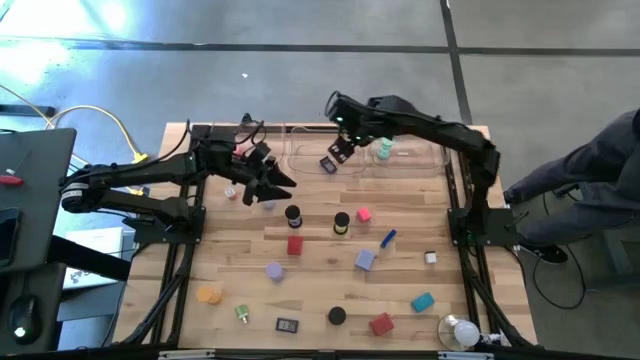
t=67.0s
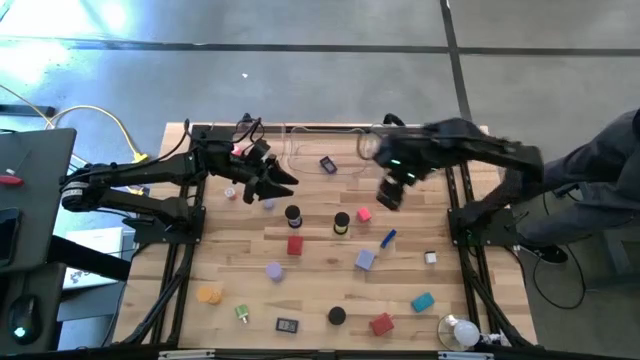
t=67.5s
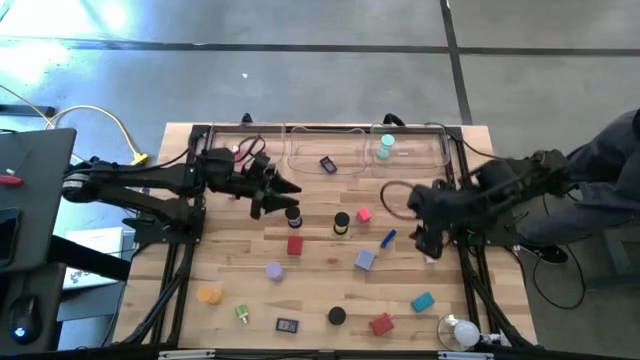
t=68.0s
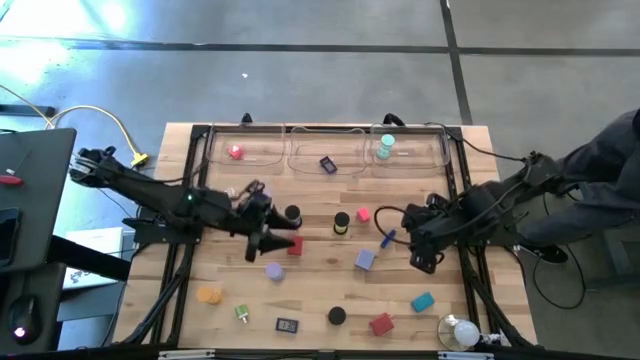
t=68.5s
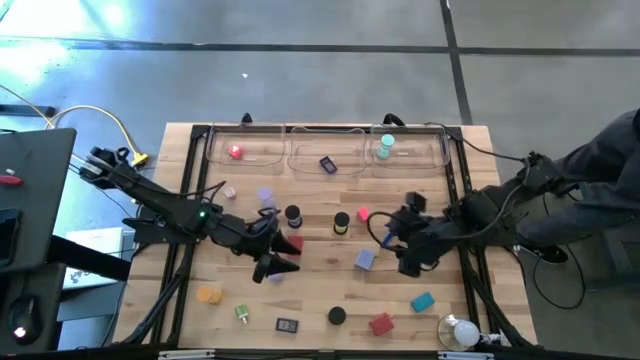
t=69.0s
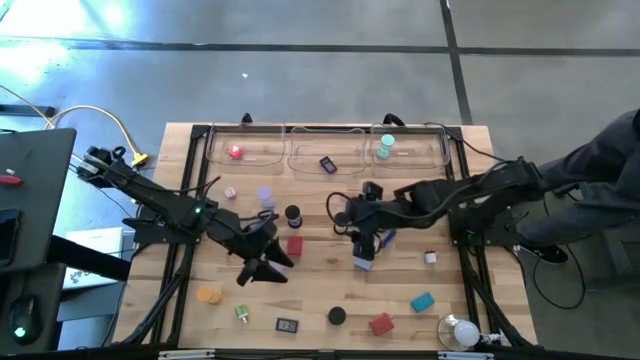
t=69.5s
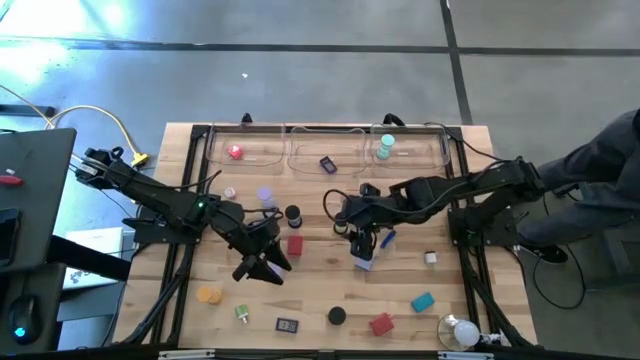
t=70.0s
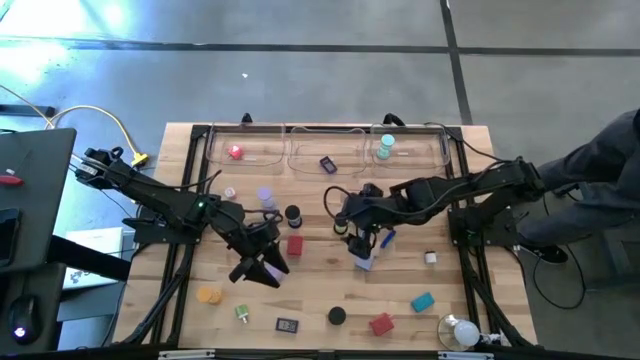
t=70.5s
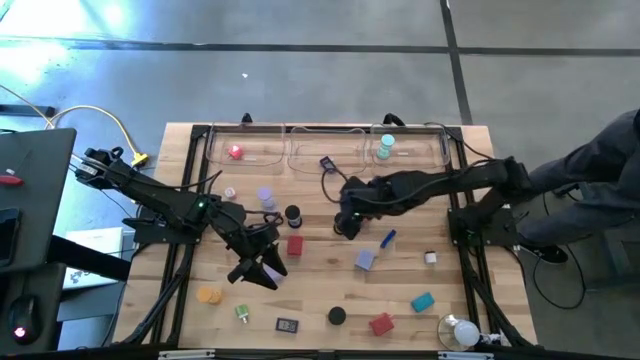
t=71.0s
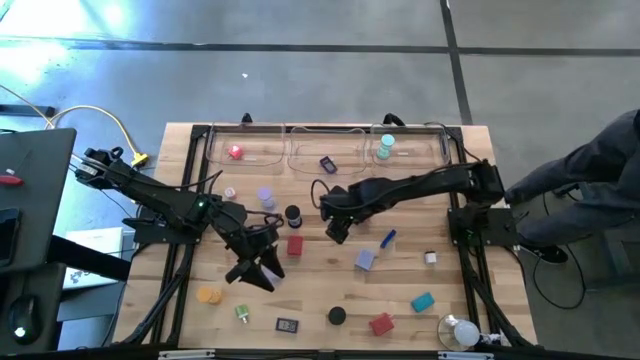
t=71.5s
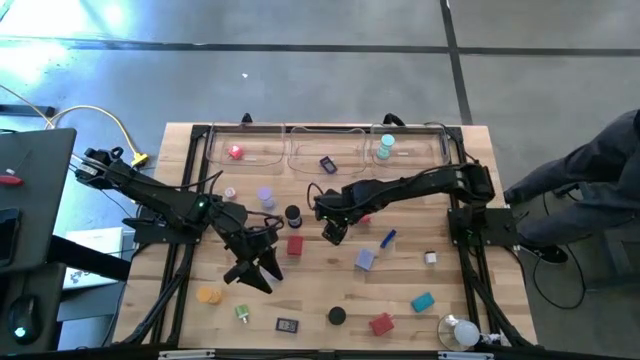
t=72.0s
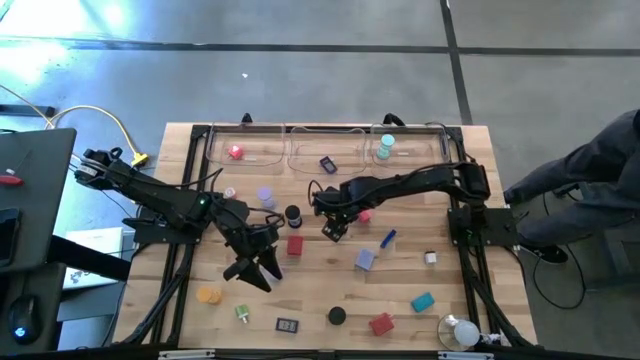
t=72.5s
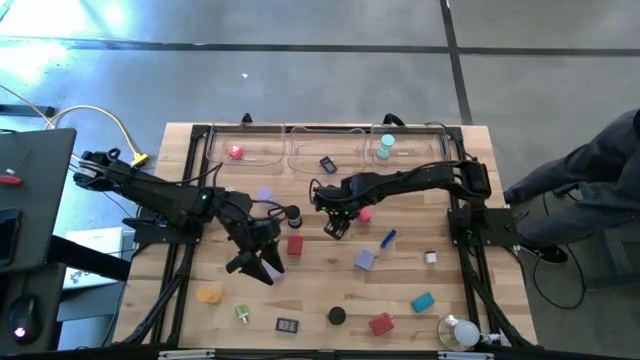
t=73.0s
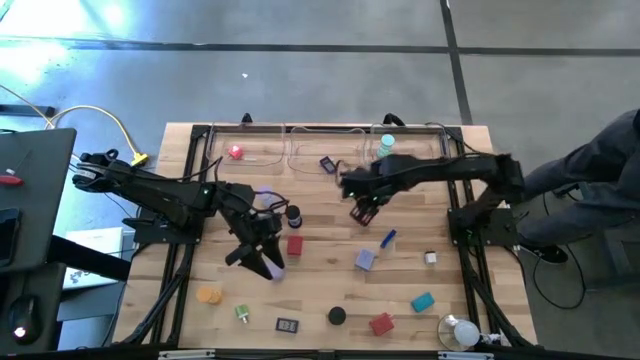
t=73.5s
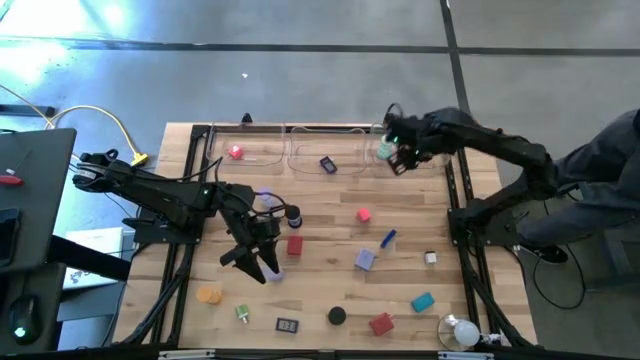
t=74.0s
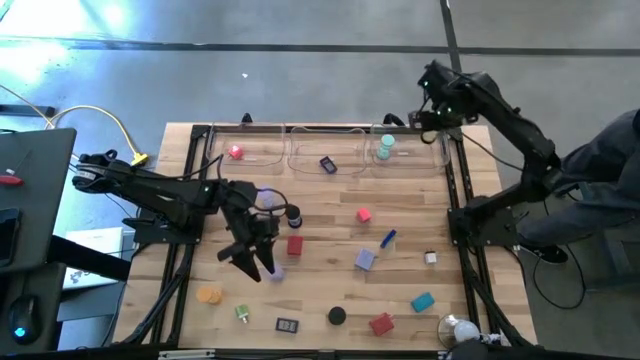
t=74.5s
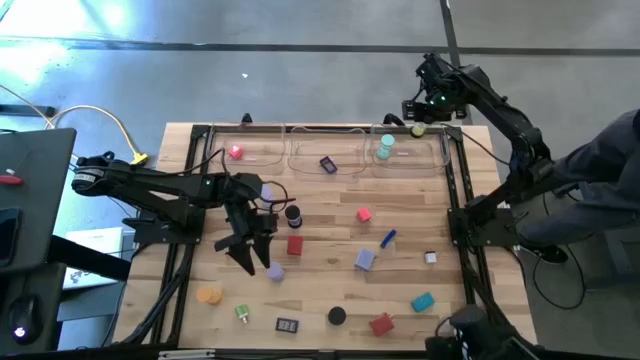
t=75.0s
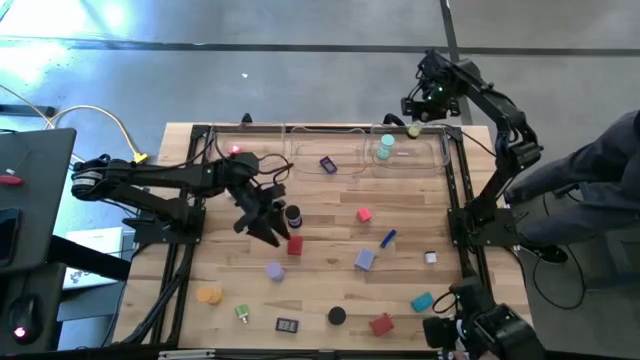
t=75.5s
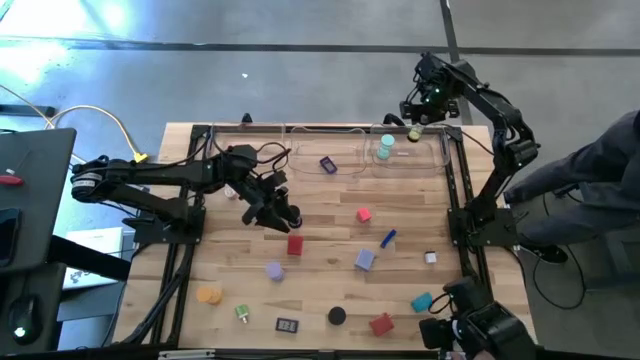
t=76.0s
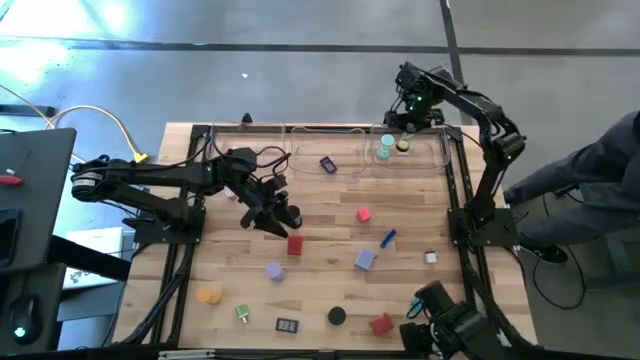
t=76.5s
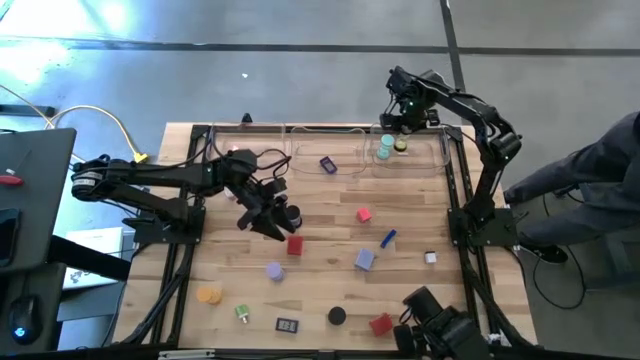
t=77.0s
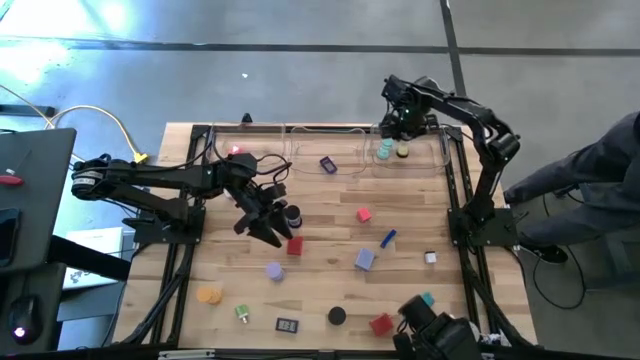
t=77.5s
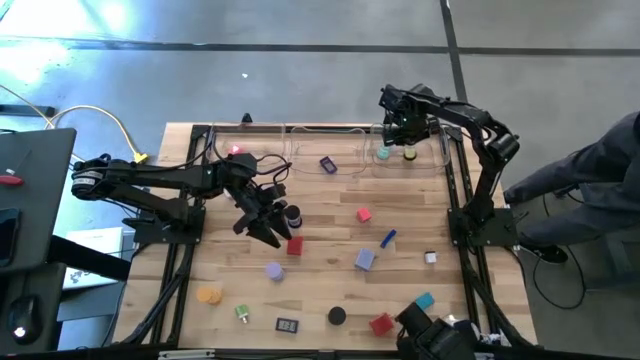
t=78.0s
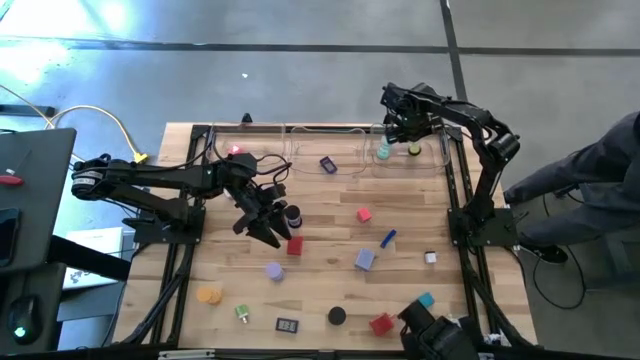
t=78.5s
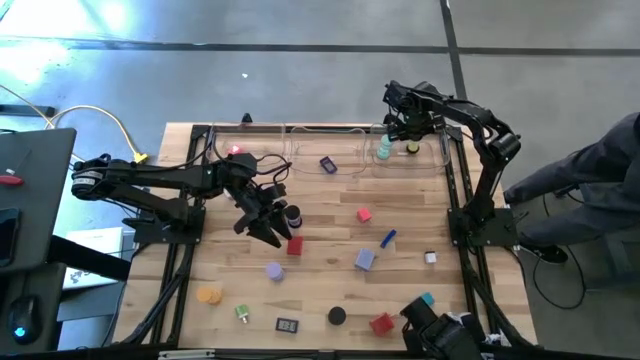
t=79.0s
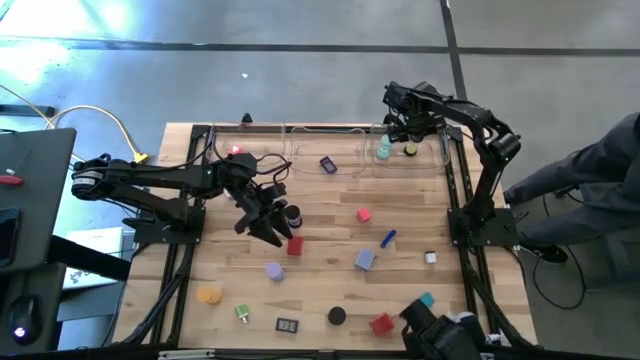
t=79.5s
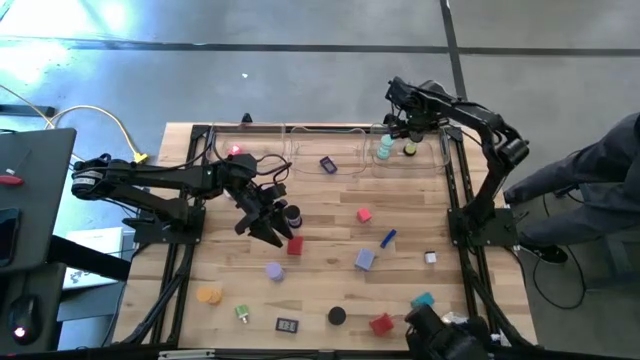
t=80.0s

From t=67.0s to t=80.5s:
Task: Pick & Place Office items
Put the top right black hourglass into the right transparent bin

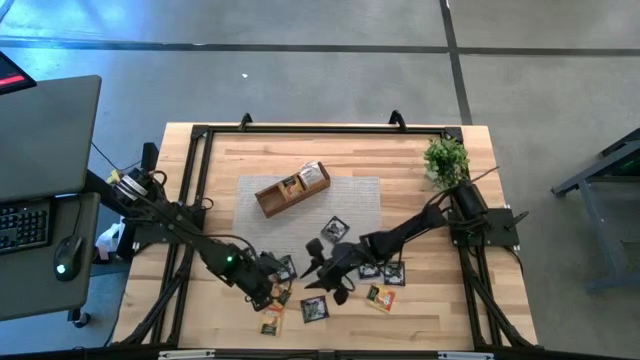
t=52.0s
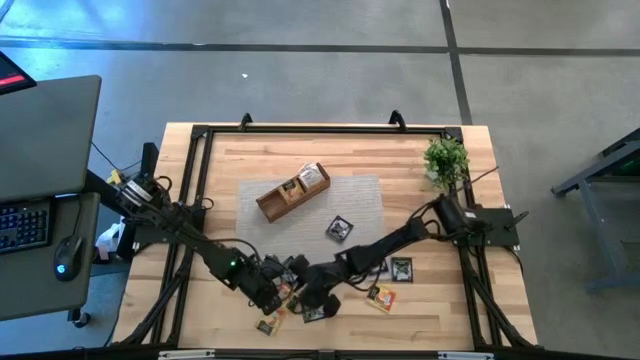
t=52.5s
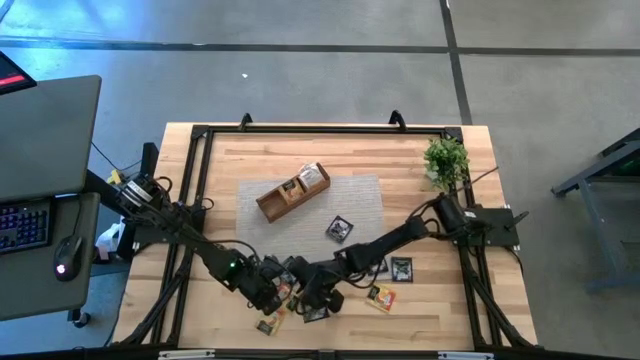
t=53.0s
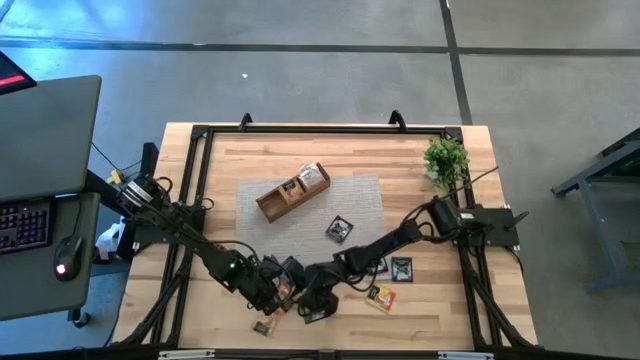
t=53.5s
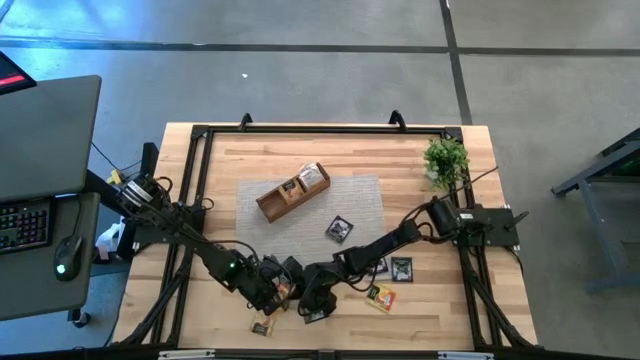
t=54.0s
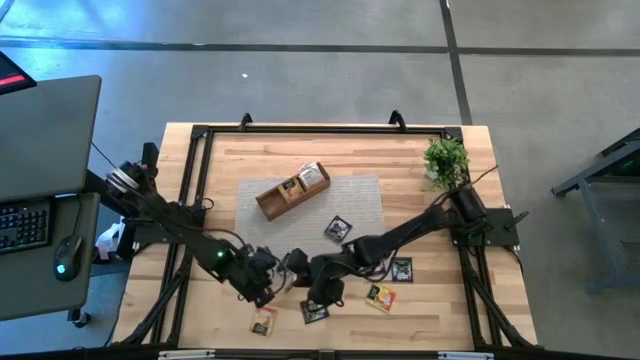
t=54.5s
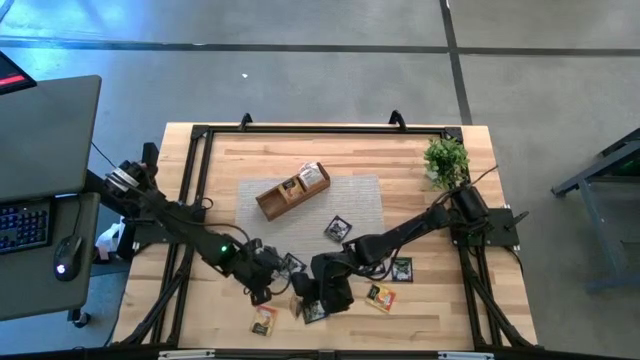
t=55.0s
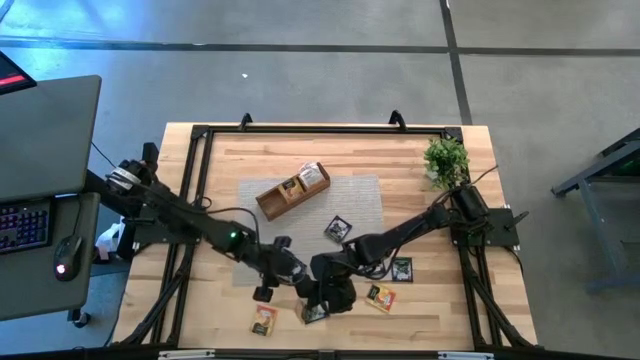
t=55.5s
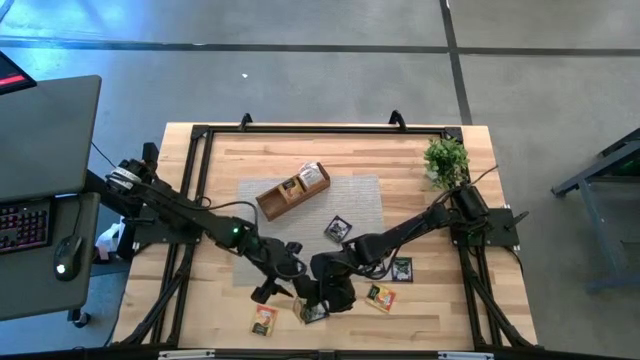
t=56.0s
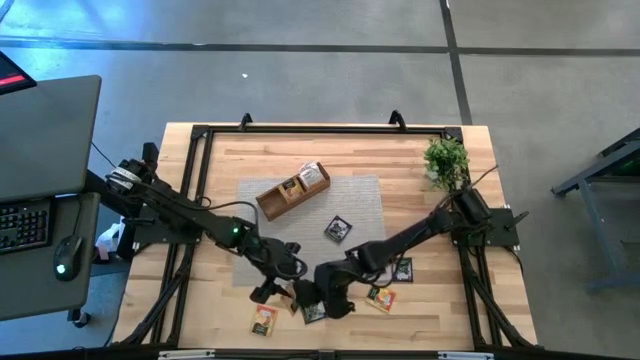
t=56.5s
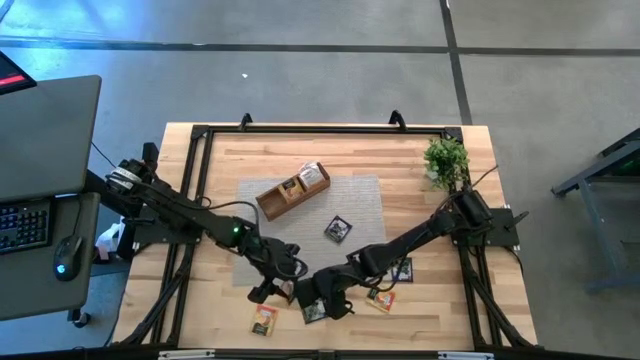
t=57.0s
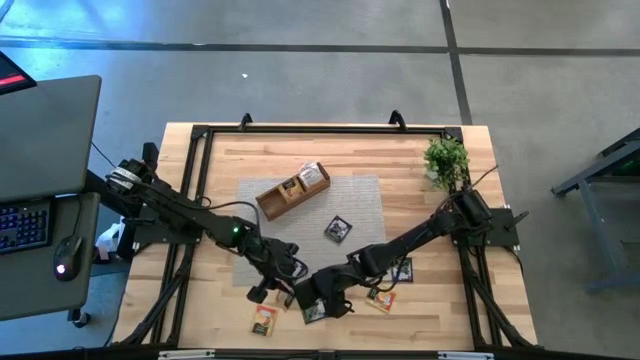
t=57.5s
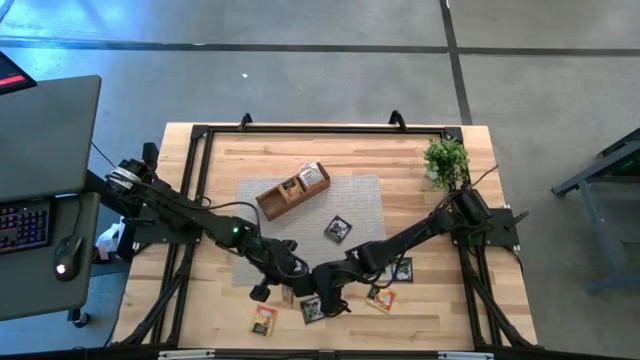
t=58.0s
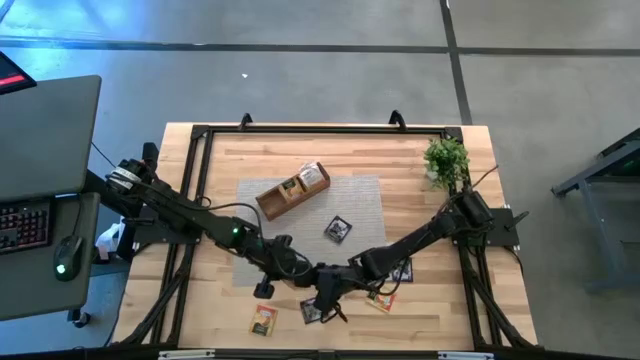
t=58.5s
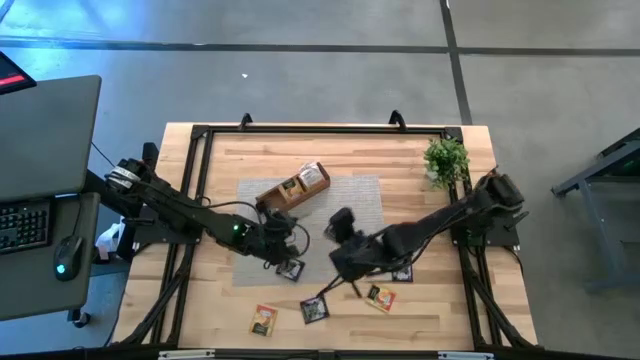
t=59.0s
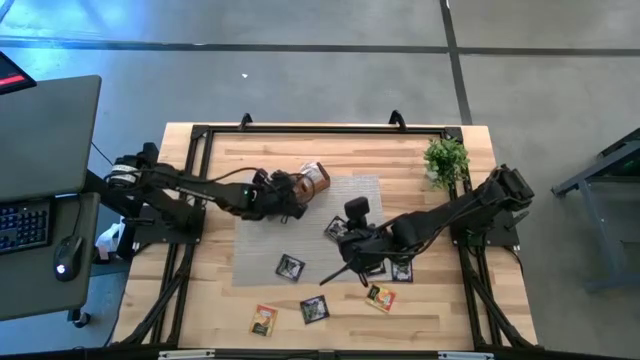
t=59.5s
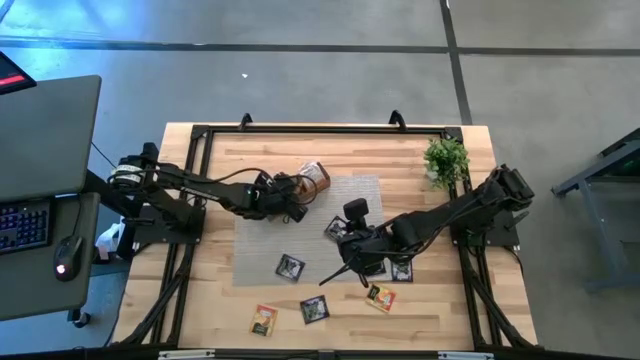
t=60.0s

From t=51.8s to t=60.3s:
Task: Pick & Place Tea
Put the yellow tea bag into the middle section of the wooden organizer
